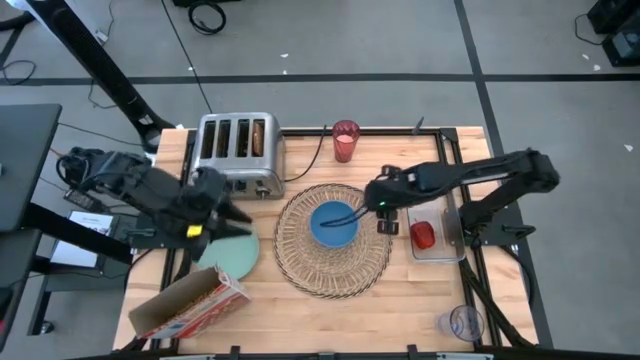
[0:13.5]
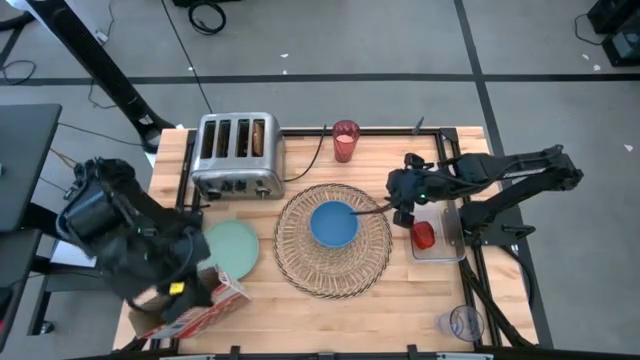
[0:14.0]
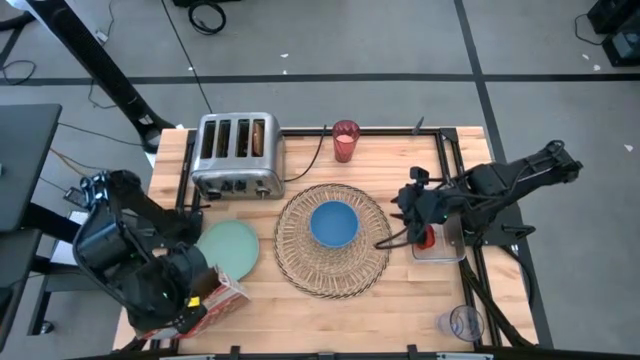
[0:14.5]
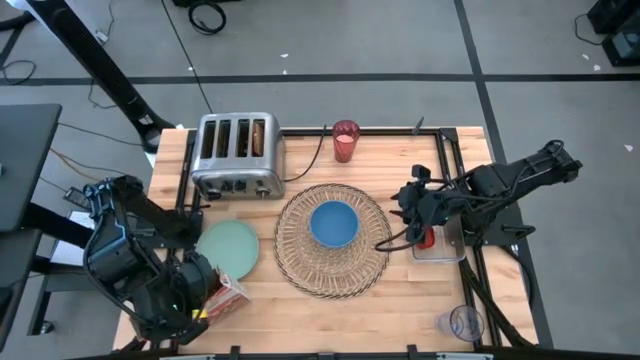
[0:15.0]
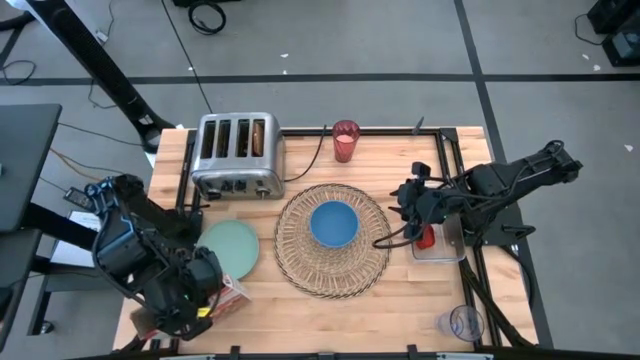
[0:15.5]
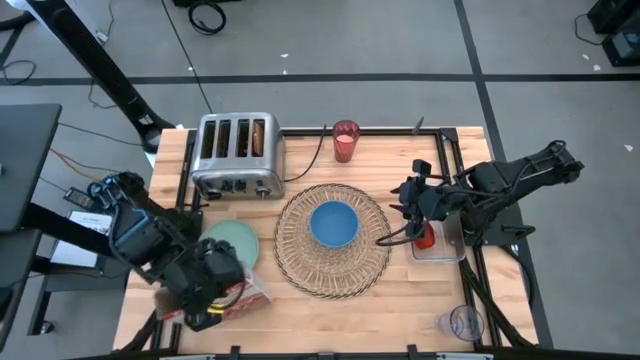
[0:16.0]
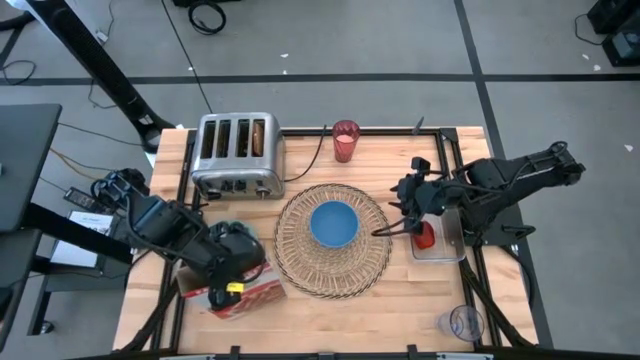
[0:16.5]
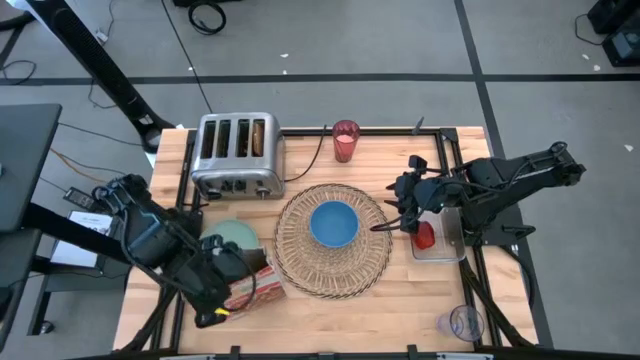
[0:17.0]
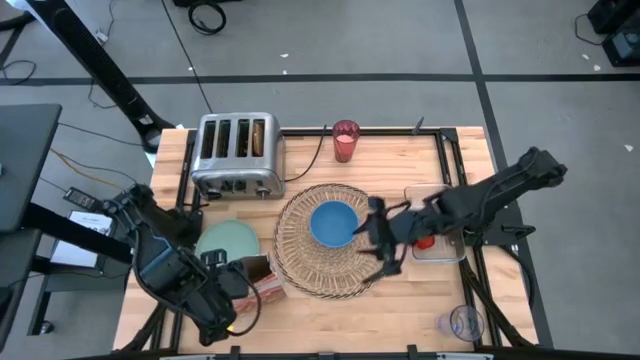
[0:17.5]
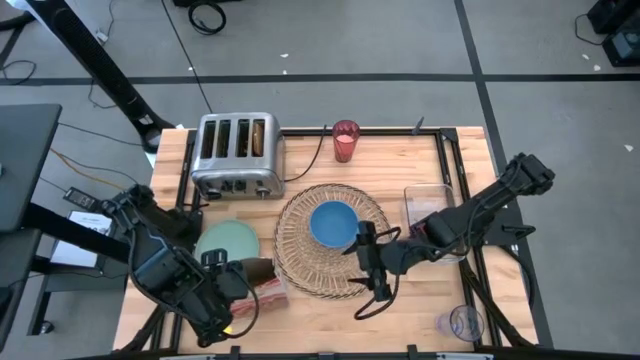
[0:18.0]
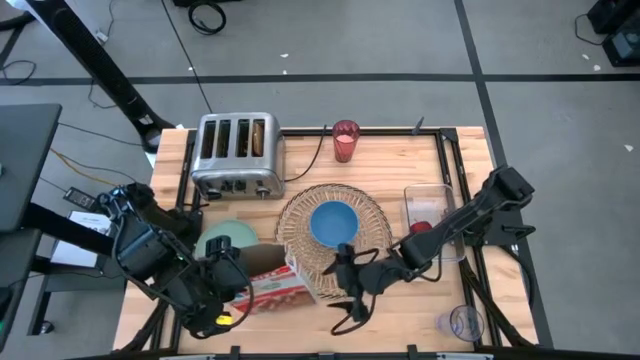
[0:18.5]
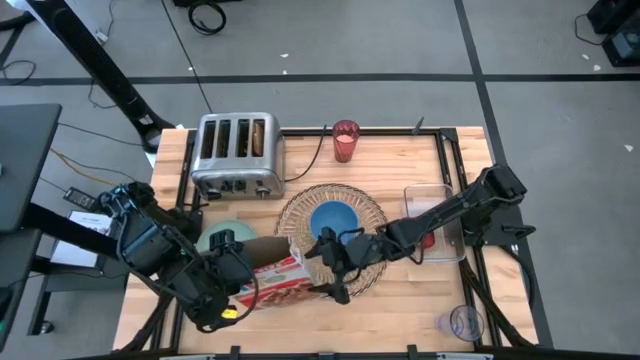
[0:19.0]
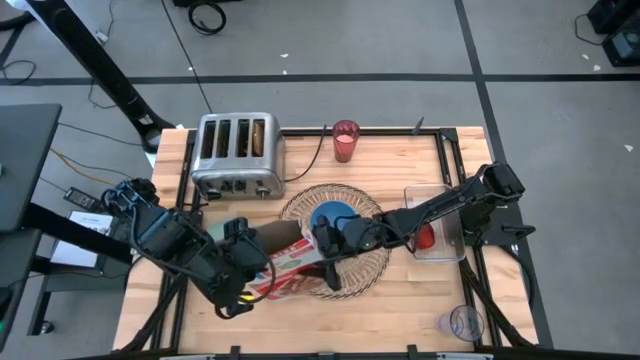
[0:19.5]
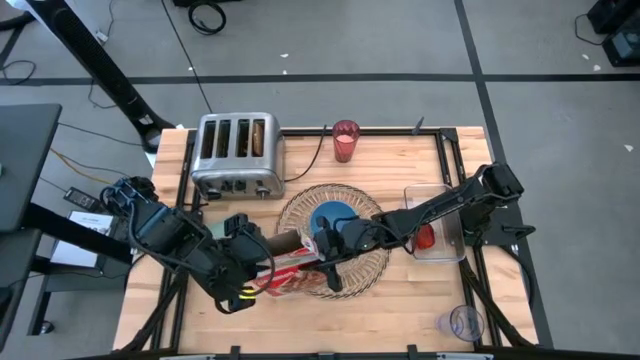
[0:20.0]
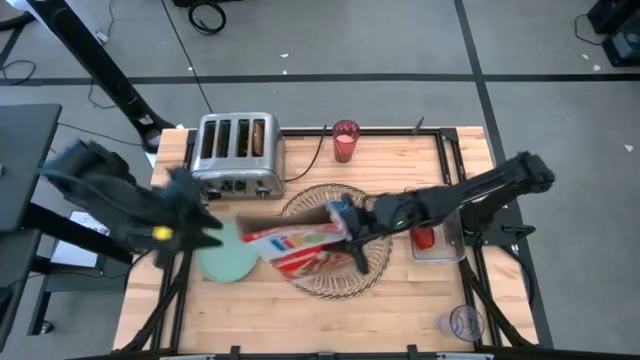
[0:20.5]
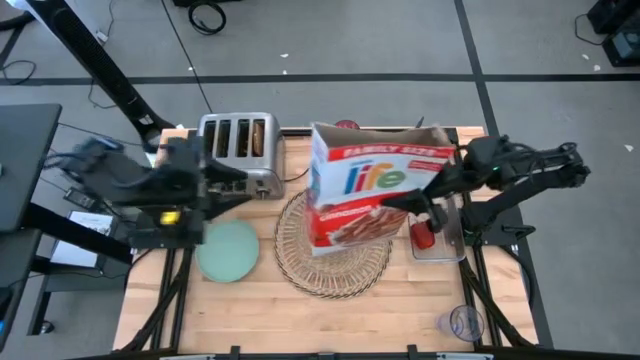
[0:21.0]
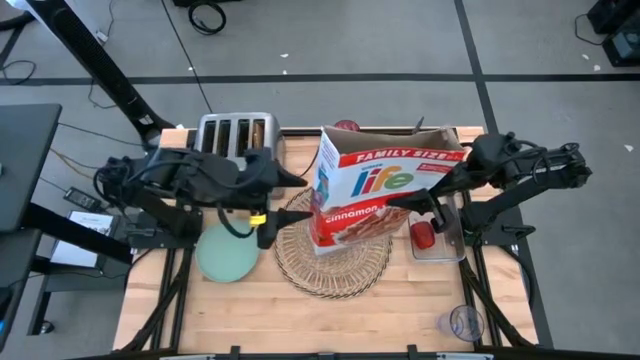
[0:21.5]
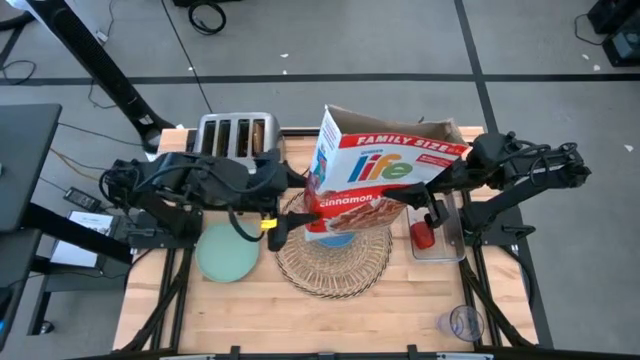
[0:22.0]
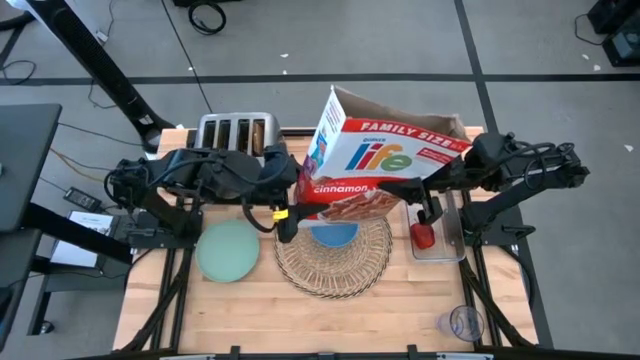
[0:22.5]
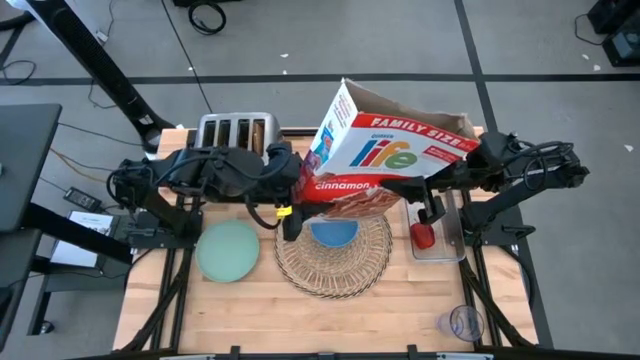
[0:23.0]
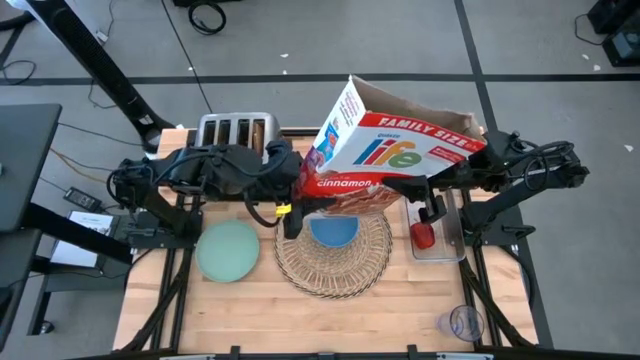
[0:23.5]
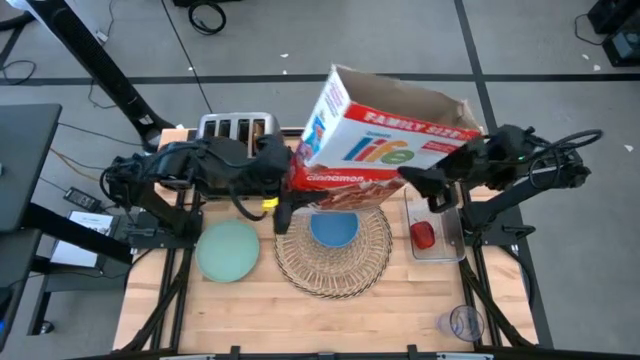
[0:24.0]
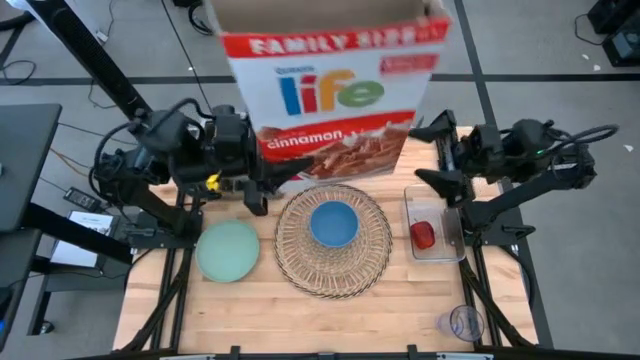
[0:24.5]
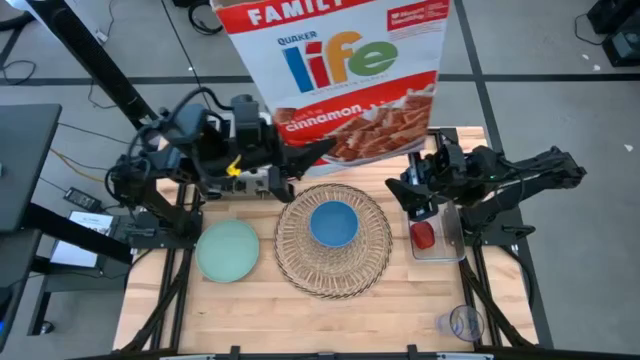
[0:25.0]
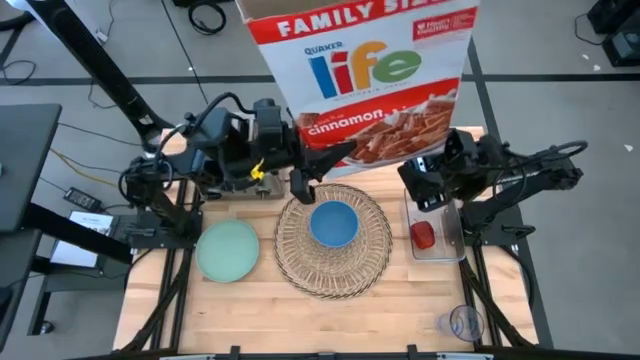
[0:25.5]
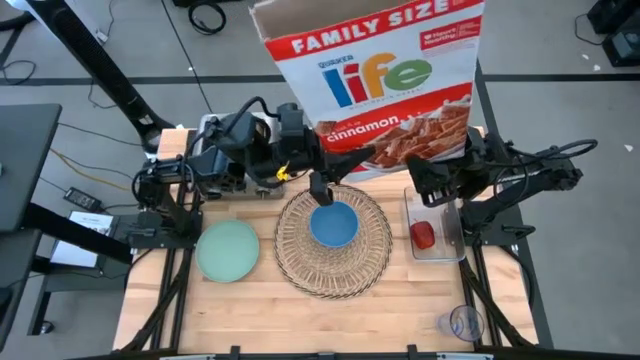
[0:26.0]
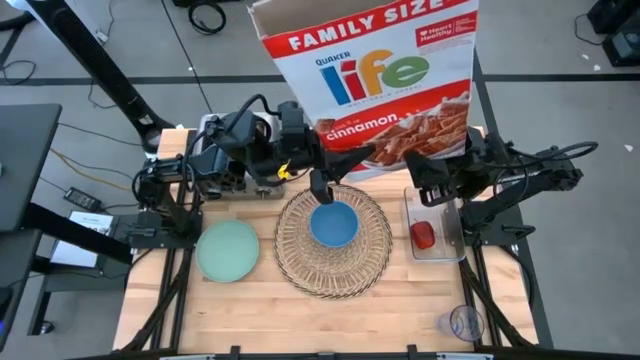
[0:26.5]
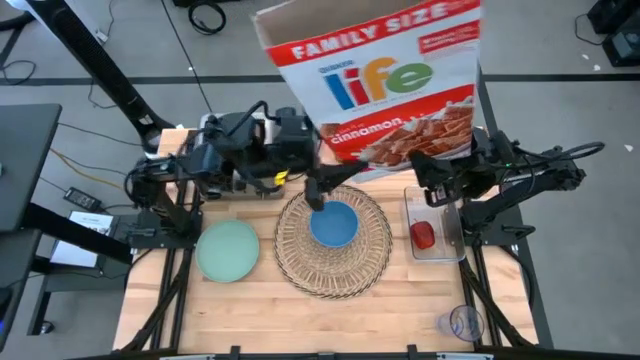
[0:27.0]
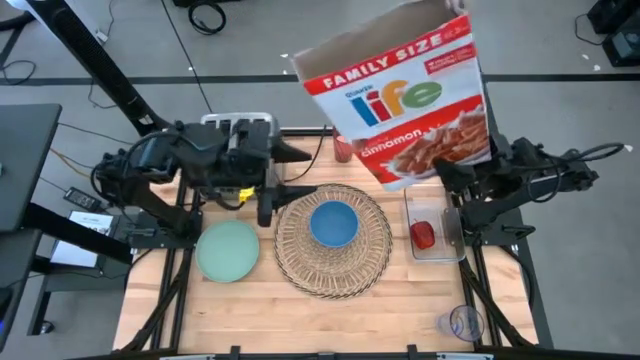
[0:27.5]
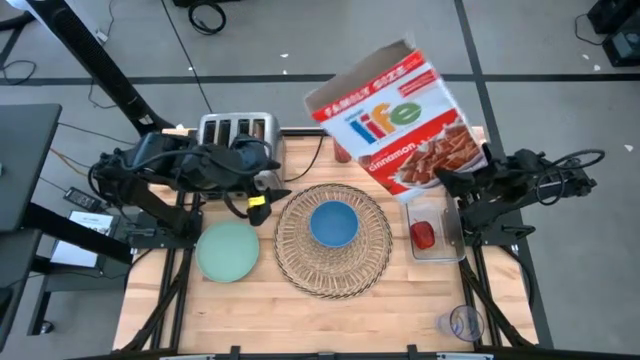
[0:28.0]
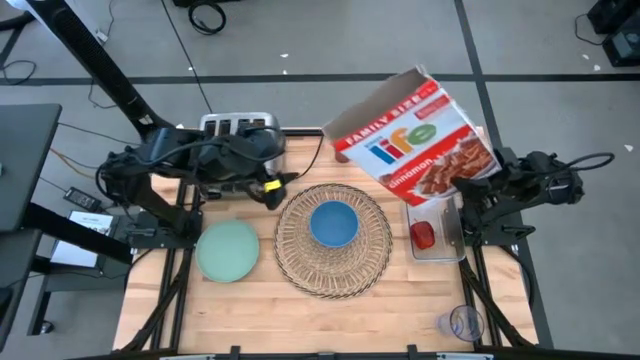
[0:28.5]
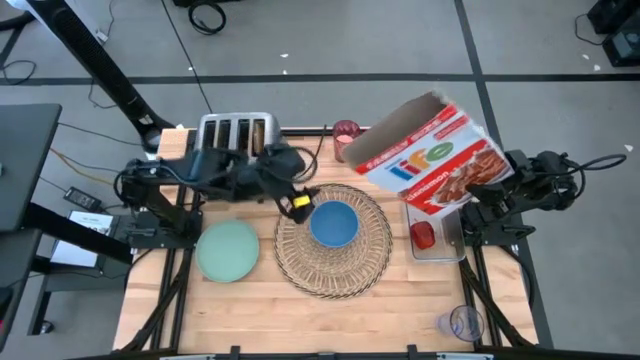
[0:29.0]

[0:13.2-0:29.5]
Task: Arrange a breakfast setting
Pour the cereal into the bowl

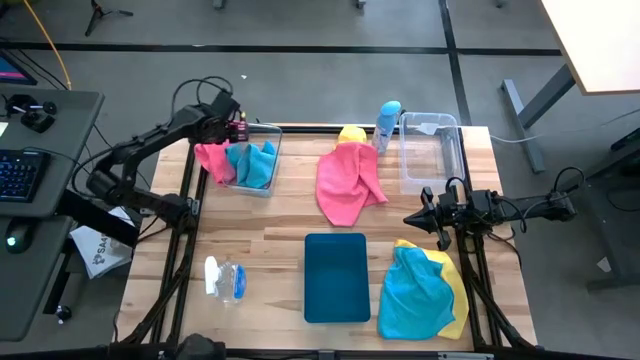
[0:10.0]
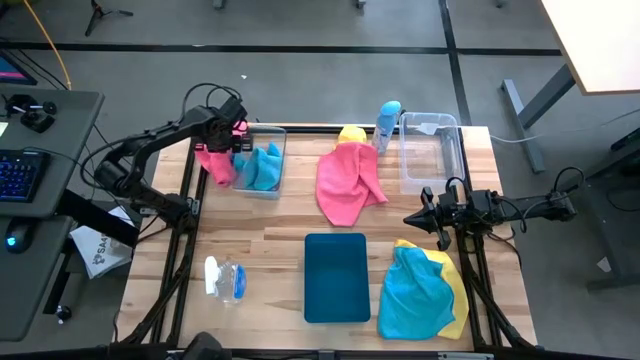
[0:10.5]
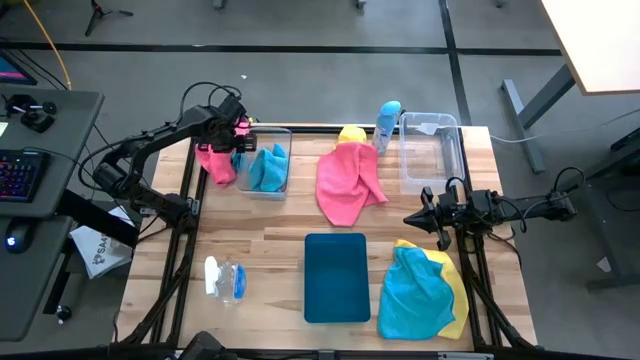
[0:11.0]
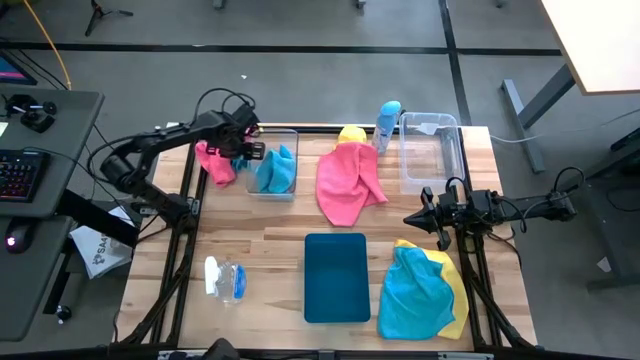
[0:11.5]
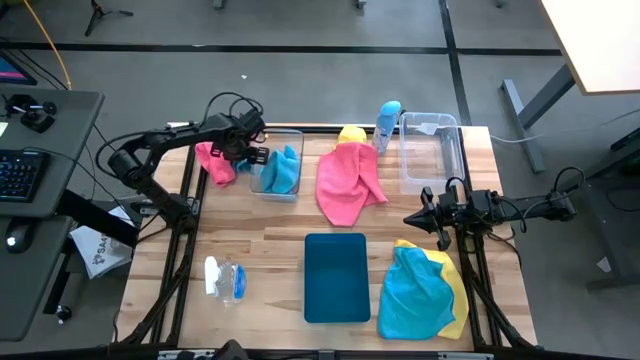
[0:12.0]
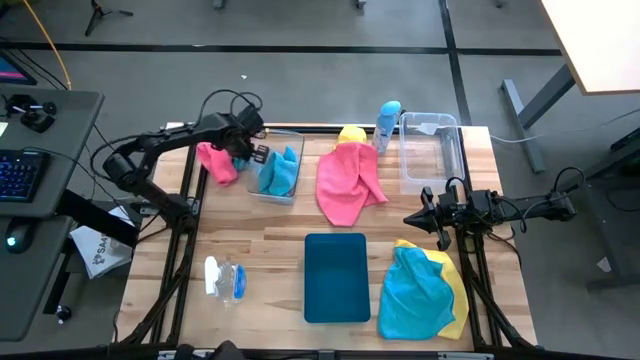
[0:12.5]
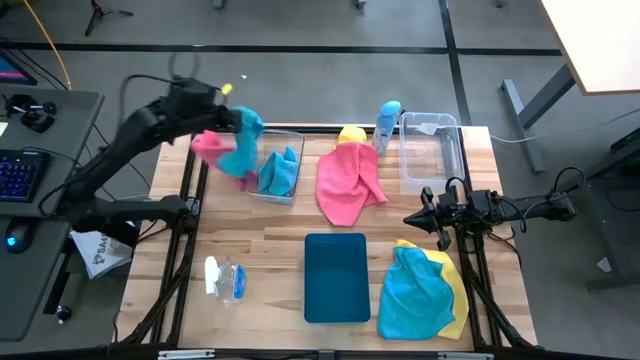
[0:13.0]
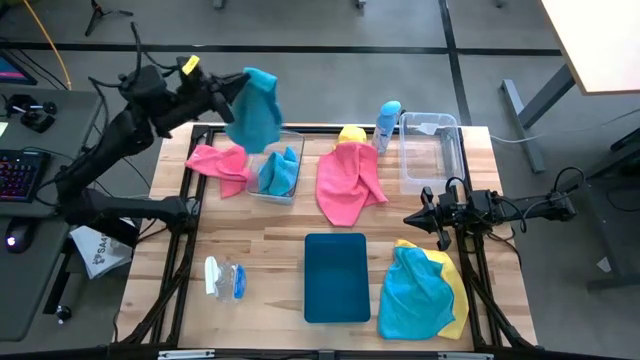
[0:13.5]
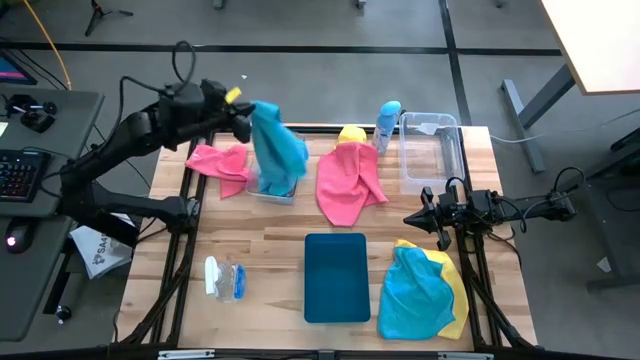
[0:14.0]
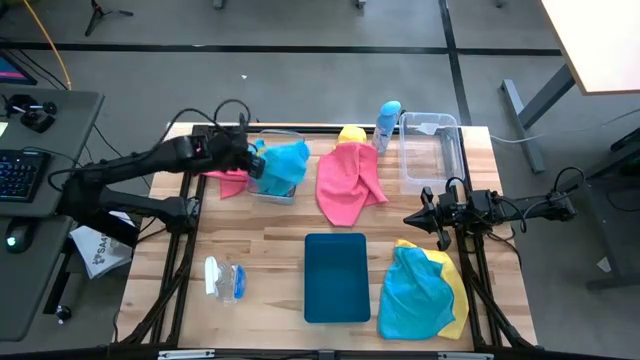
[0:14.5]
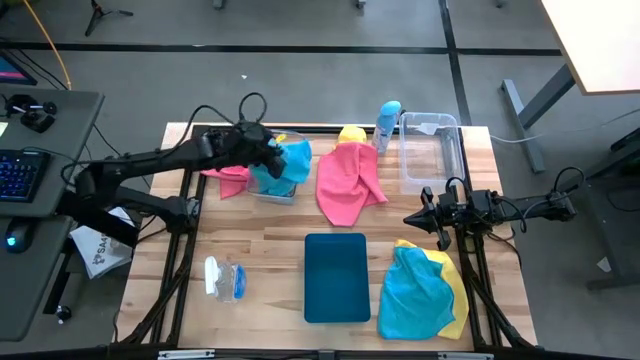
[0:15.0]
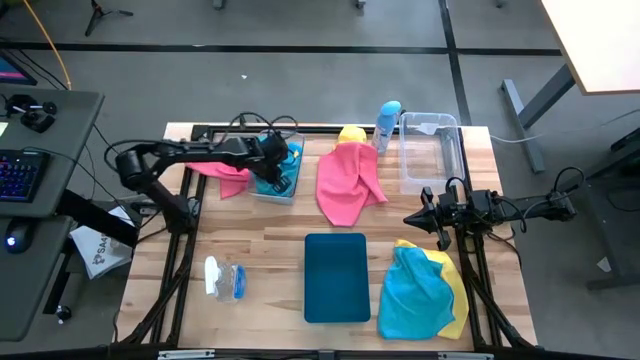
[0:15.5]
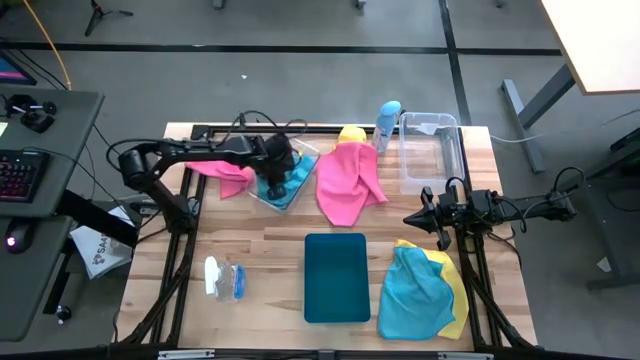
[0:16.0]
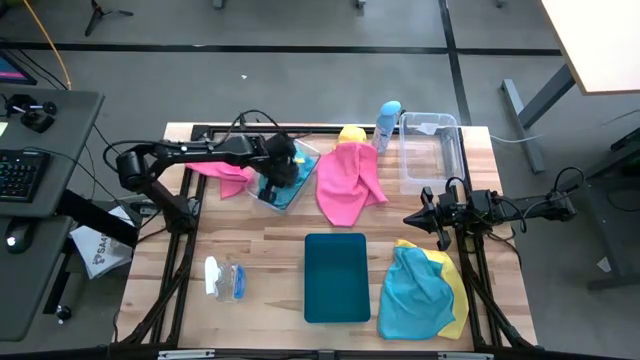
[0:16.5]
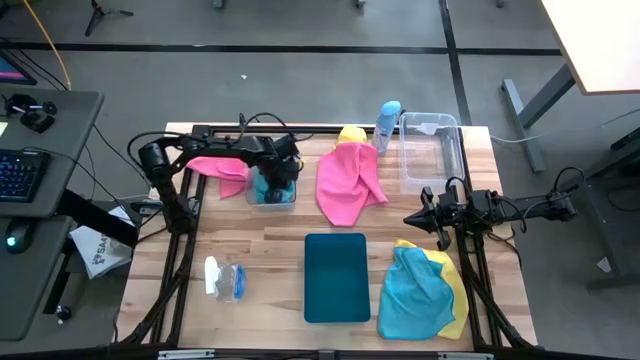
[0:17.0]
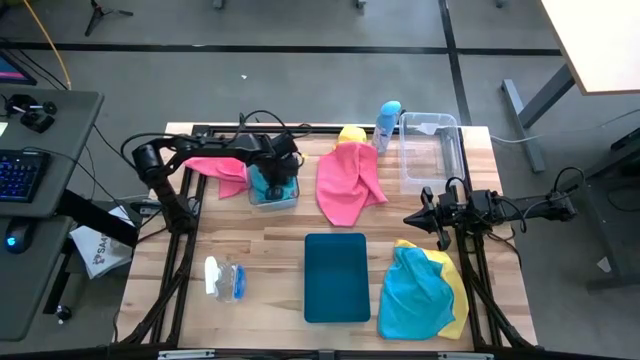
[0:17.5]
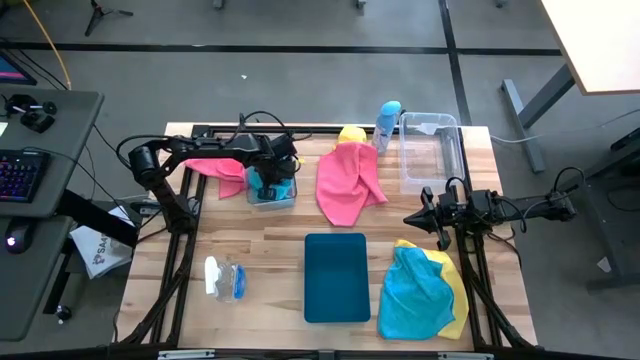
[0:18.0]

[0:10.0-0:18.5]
Task: Sort microfiber towel by color & place in baskets
Put the top blue towel into the left transparent bin
